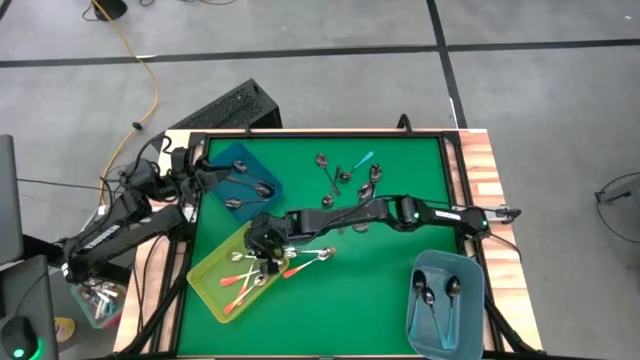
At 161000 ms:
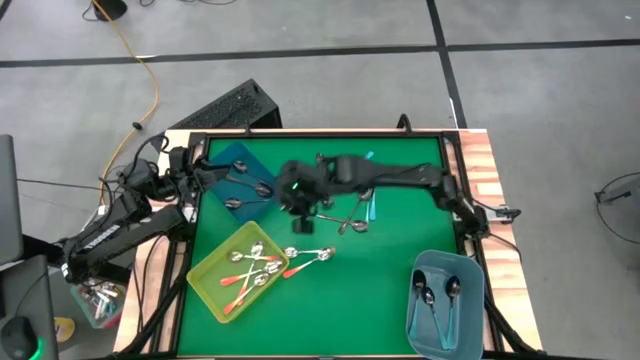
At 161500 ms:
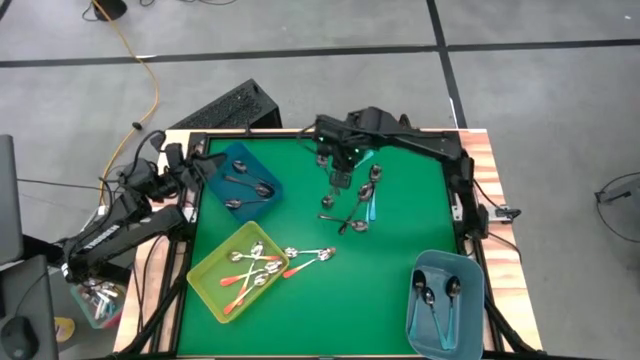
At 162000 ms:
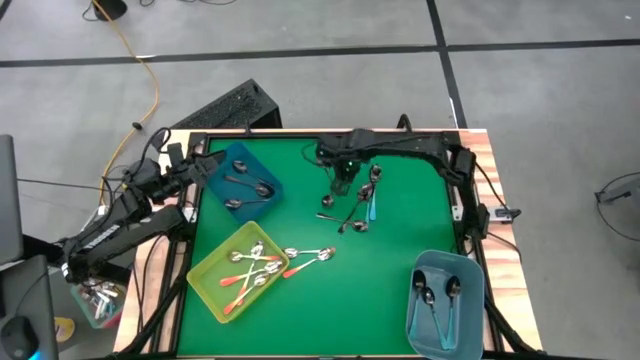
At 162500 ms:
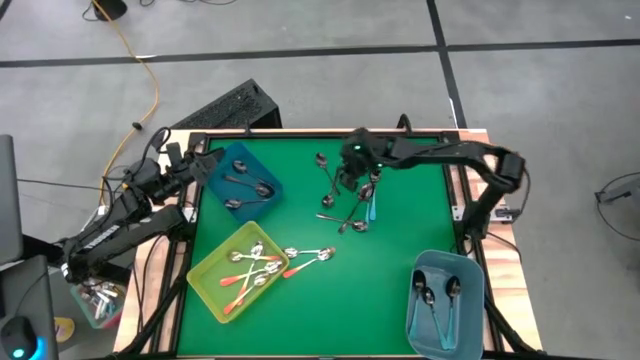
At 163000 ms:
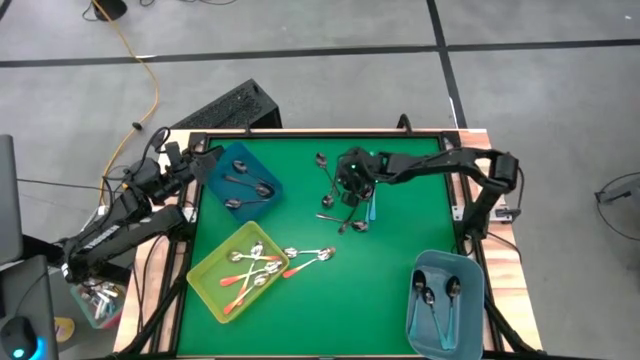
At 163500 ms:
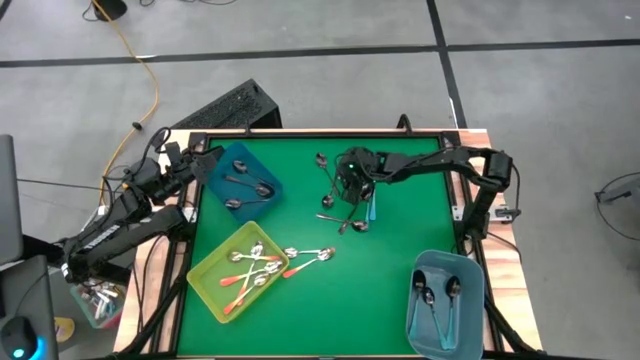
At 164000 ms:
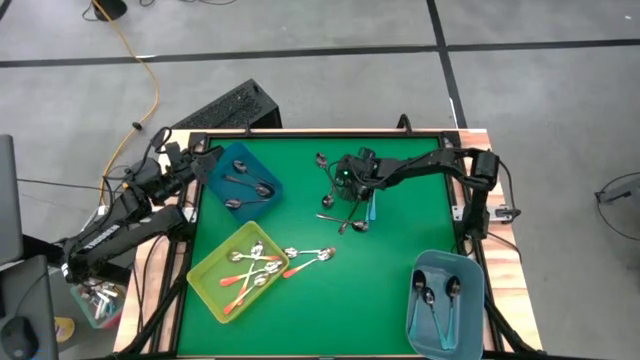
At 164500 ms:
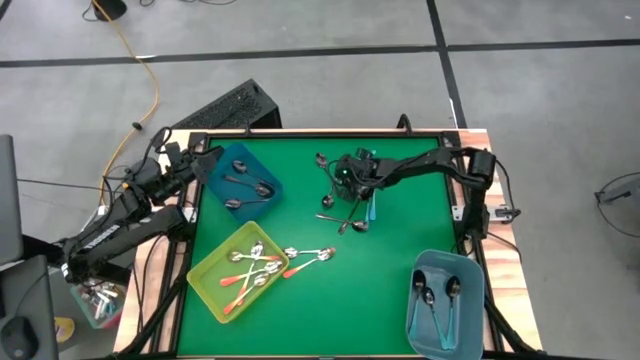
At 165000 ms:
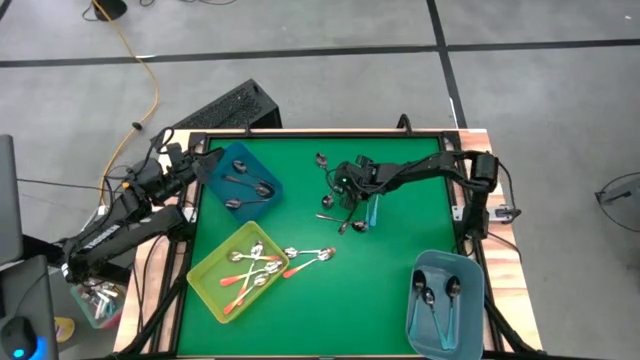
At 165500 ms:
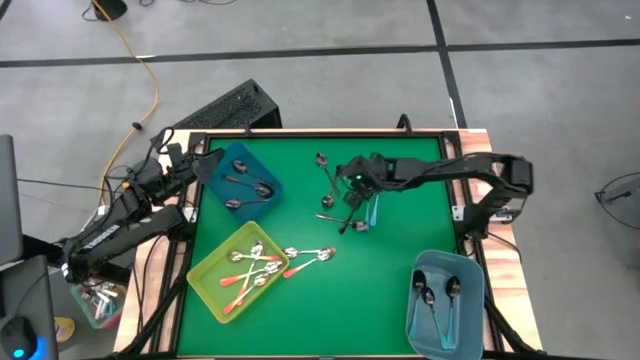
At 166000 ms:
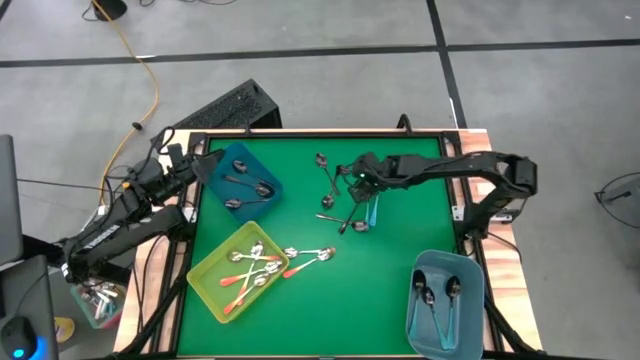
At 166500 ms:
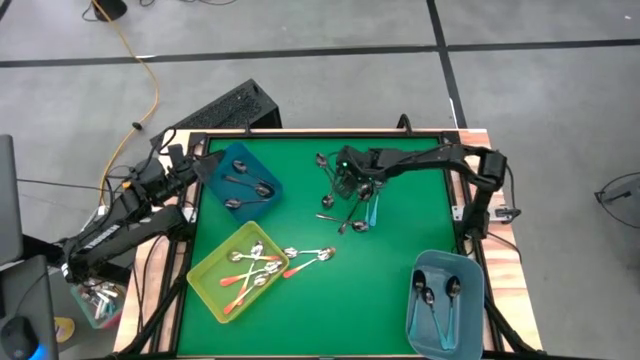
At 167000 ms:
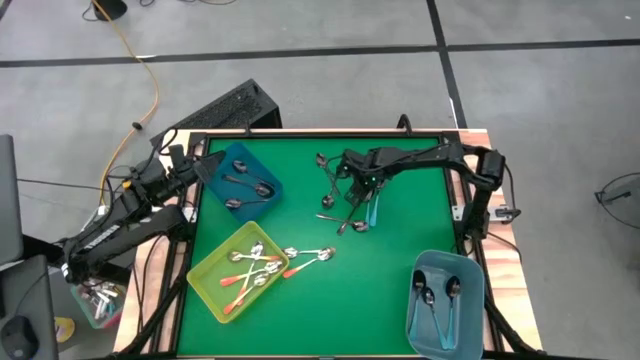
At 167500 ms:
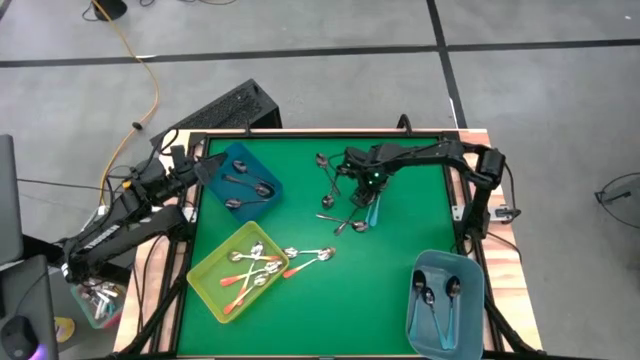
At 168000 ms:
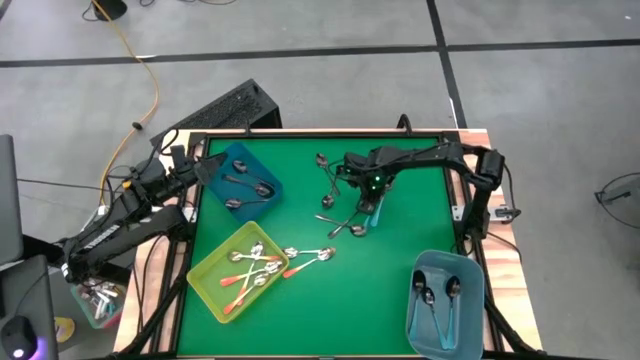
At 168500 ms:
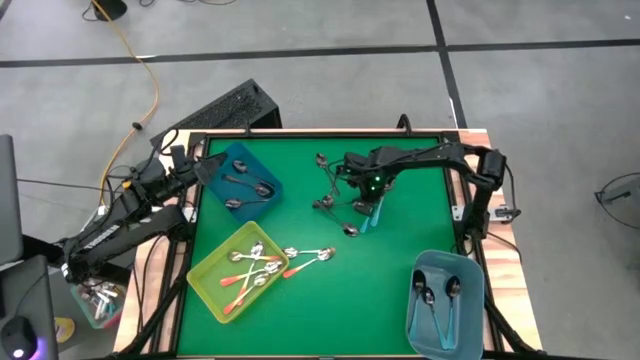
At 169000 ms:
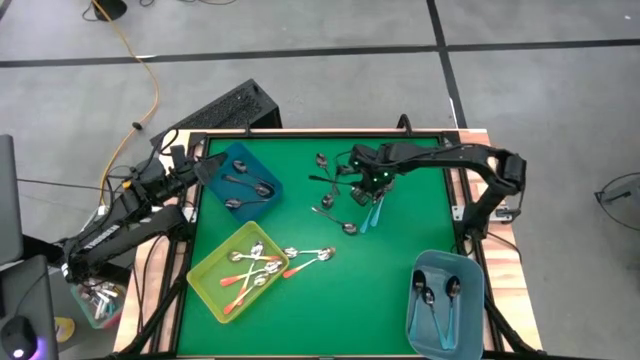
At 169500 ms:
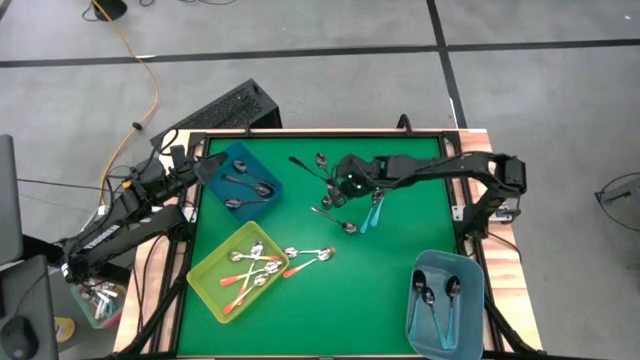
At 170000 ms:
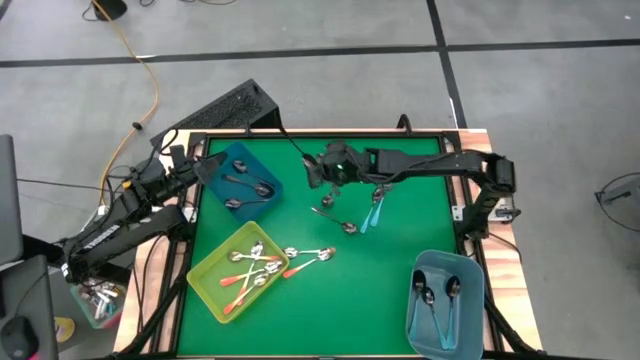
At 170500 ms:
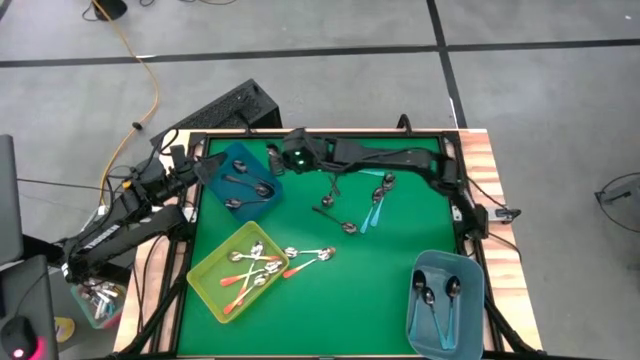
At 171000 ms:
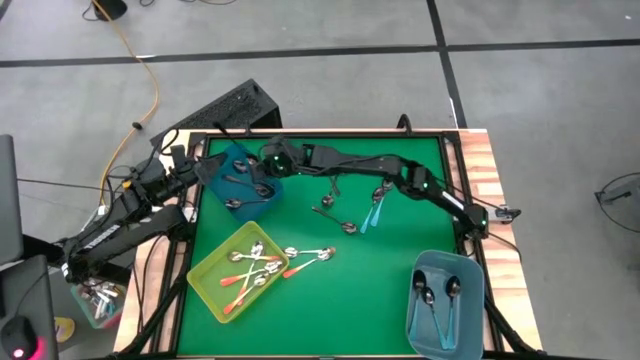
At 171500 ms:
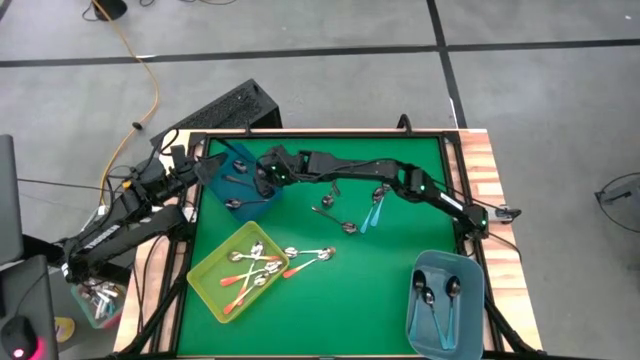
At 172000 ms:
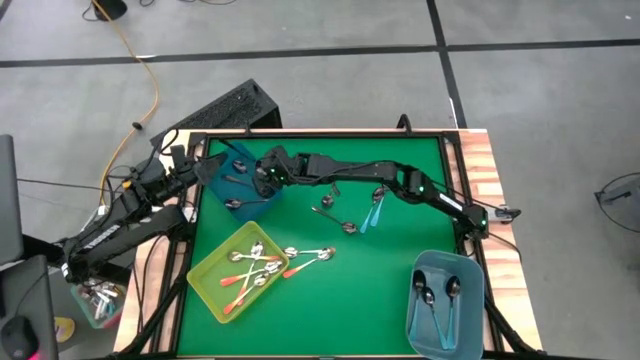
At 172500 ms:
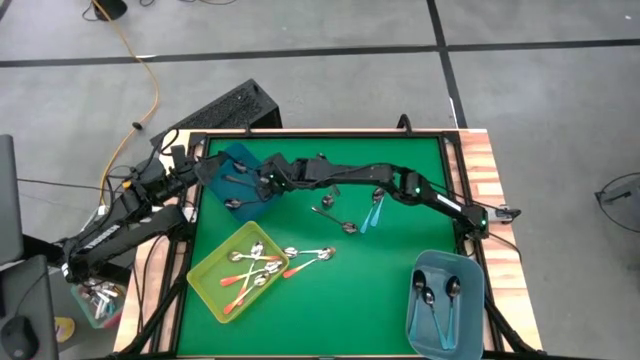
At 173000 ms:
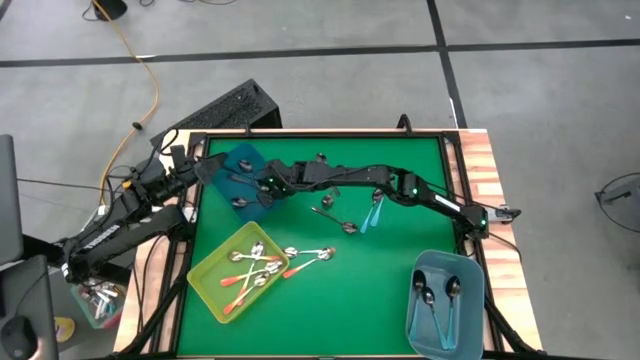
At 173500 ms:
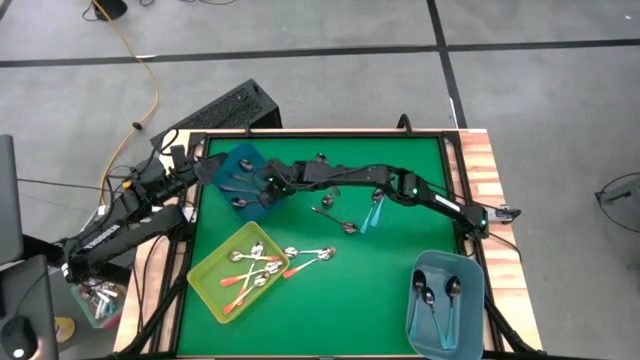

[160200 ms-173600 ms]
Task: Sort silverware by color (type)
Put the black spoon into the dark blue bin

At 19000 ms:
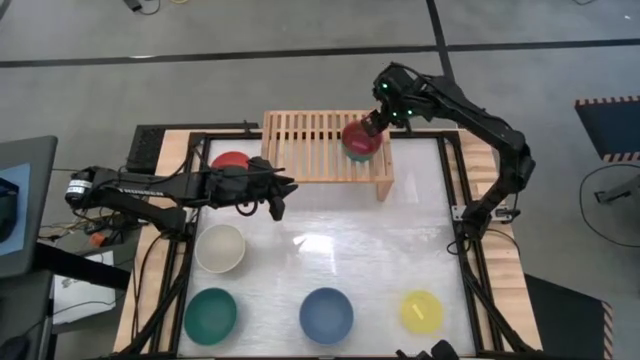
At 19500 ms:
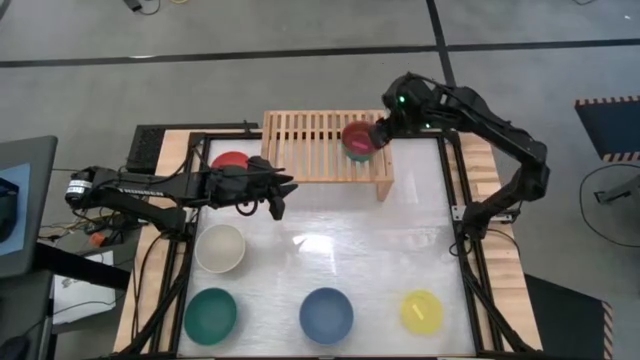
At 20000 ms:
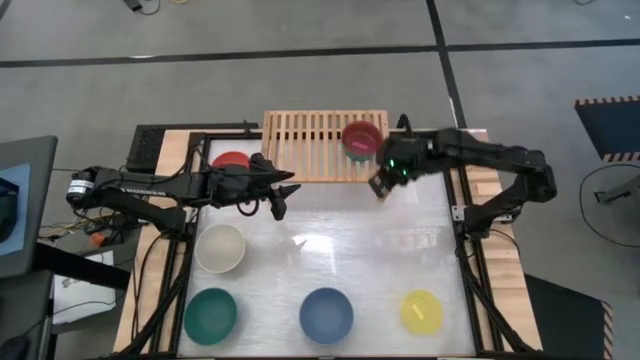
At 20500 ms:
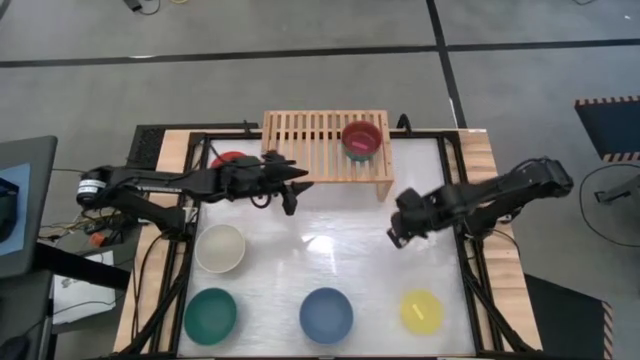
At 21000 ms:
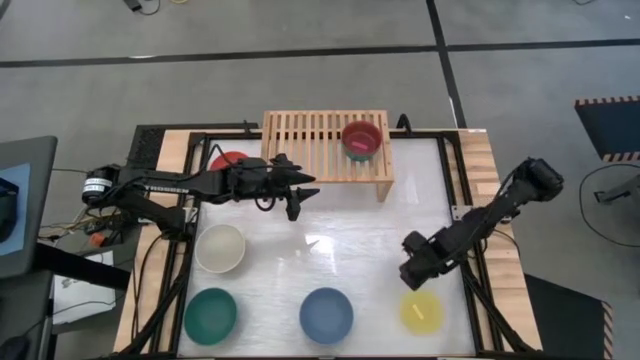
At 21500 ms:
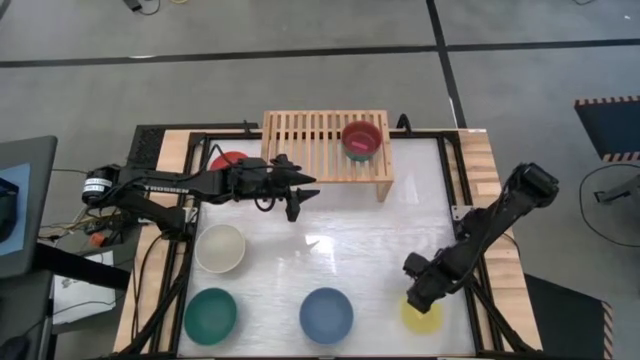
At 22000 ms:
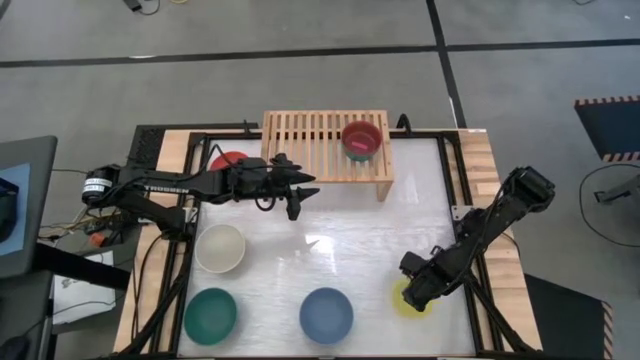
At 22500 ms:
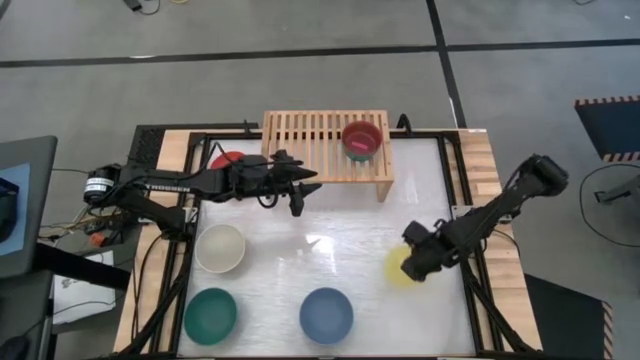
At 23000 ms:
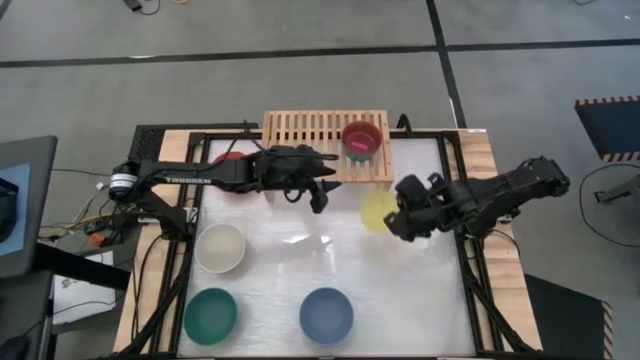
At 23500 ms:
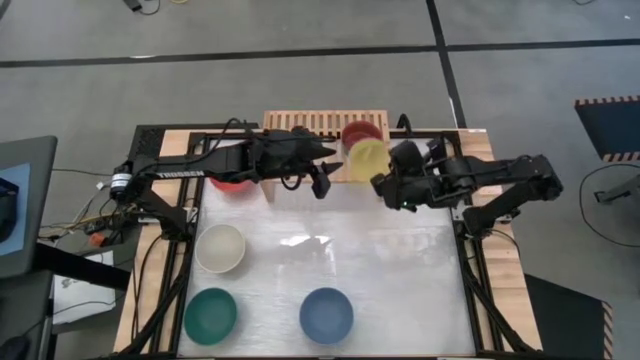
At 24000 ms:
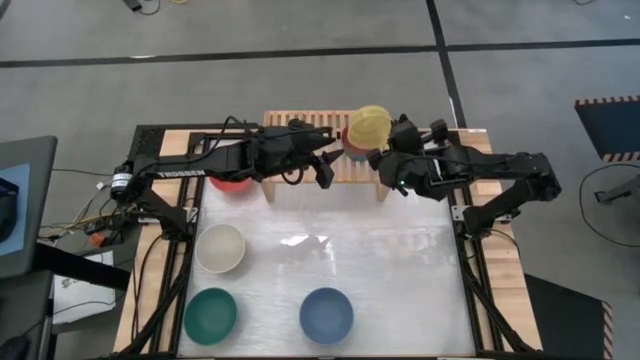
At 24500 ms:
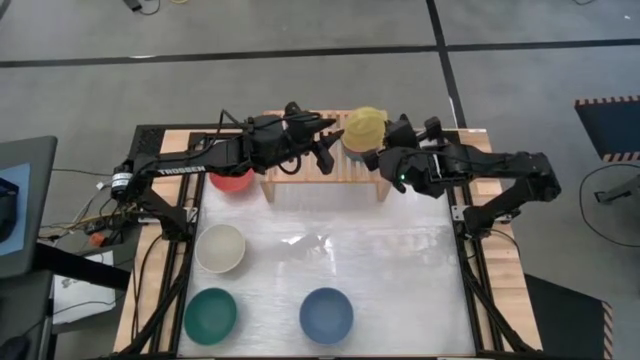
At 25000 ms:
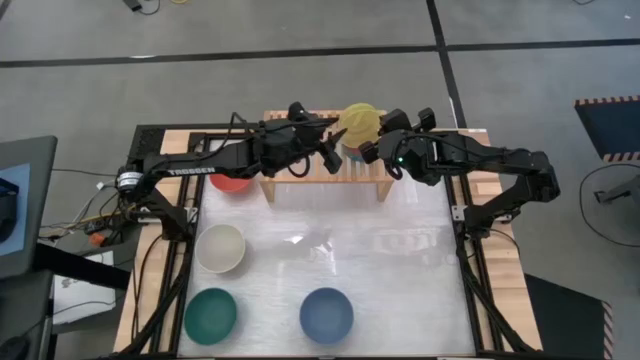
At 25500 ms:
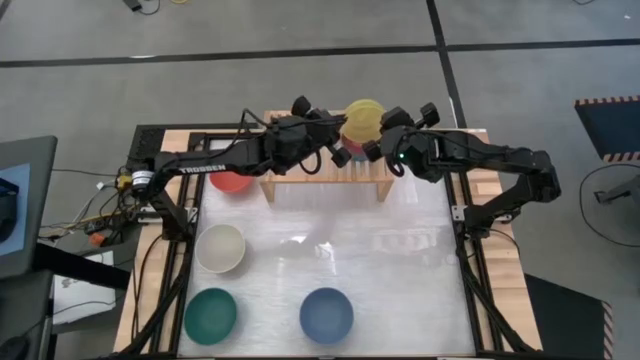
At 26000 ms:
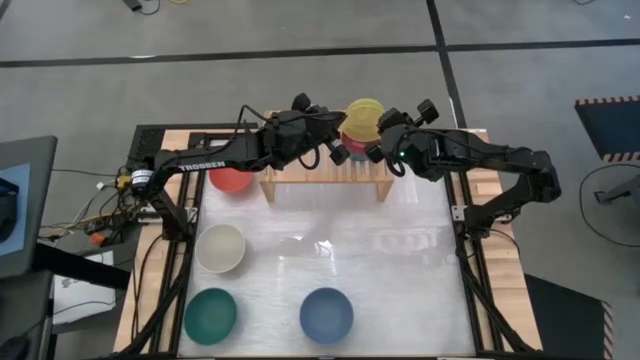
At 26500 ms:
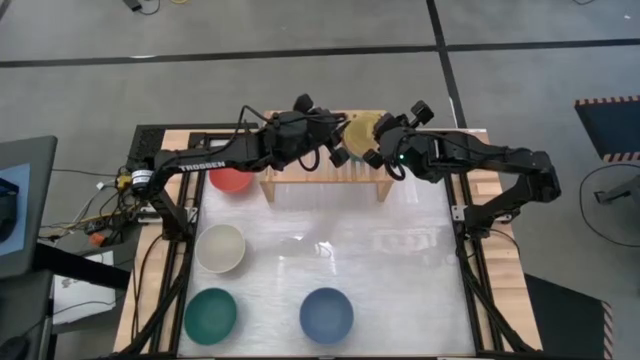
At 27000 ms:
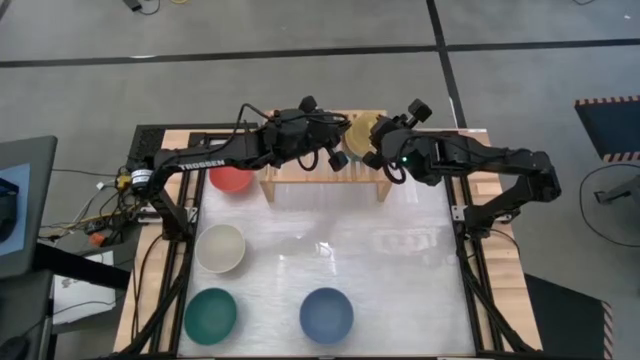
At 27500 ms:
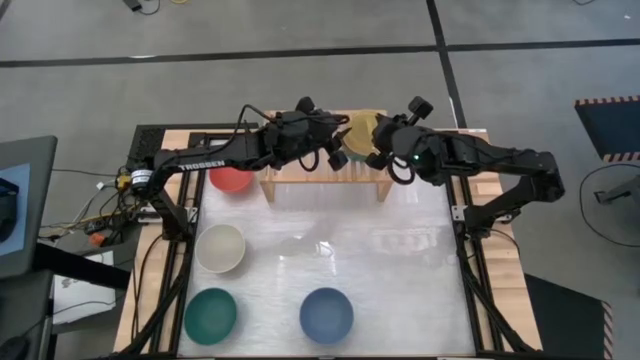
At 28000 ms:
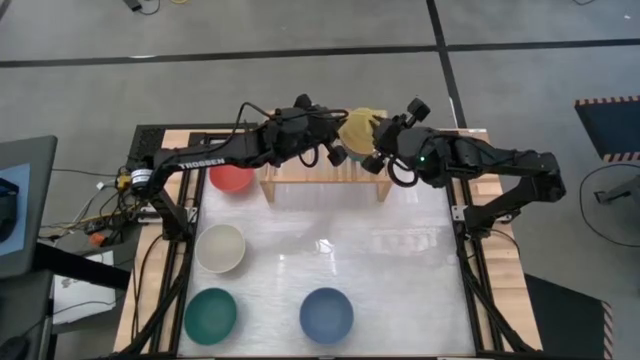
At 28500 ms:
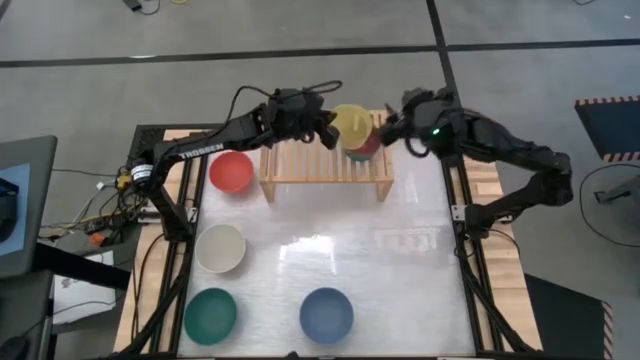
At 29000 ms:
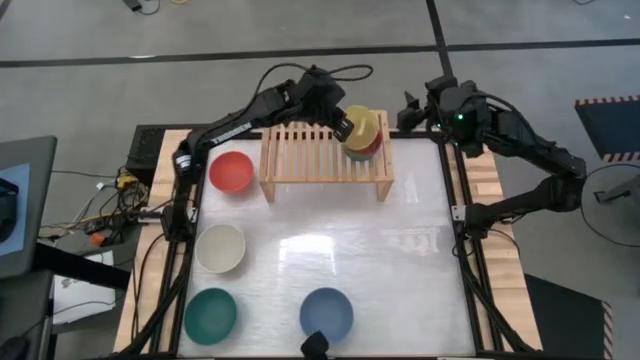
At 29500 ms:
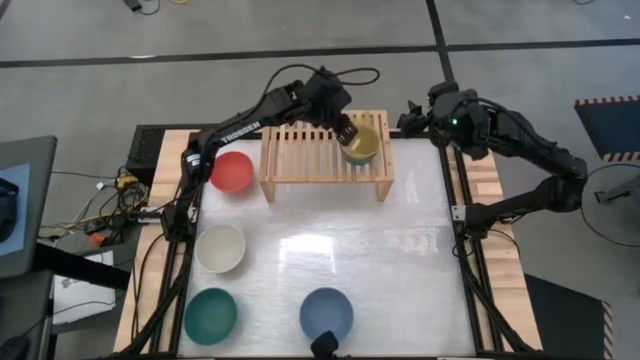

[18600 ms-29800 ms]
Task: Place and stack bowls onto a shelf
Stack the small yellow transparent bowl on top of the small red transparent bowl on the shelf
